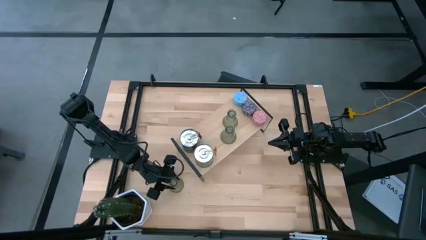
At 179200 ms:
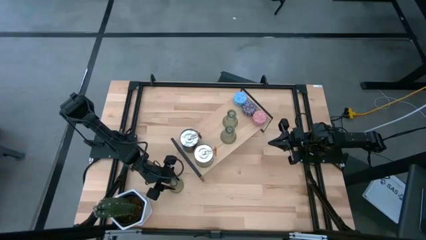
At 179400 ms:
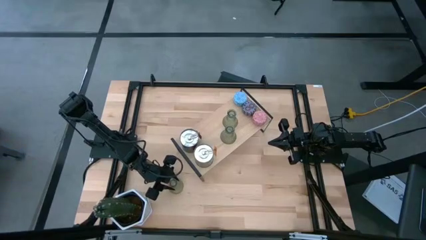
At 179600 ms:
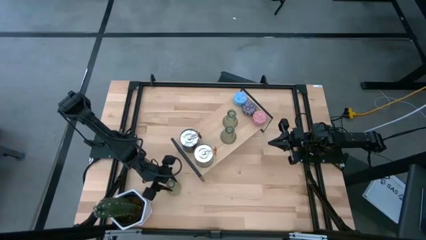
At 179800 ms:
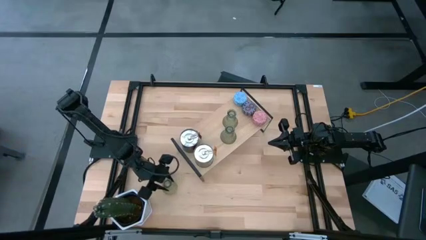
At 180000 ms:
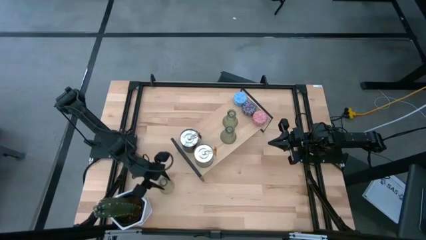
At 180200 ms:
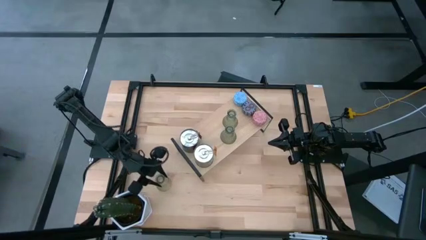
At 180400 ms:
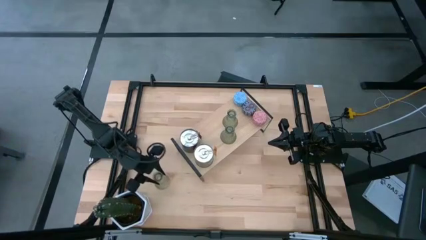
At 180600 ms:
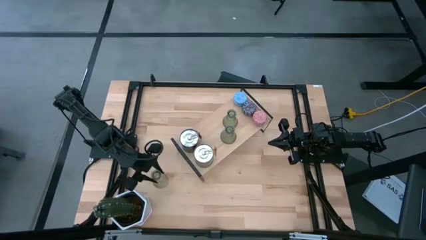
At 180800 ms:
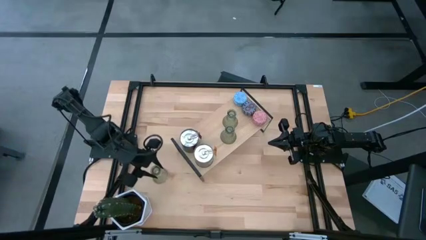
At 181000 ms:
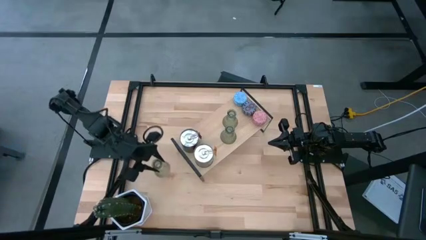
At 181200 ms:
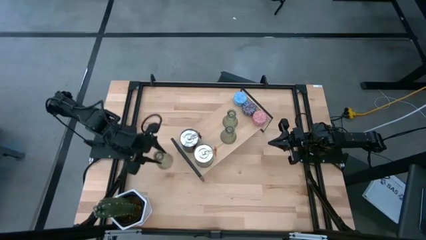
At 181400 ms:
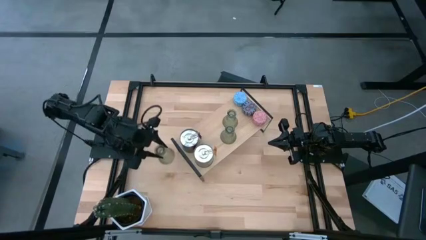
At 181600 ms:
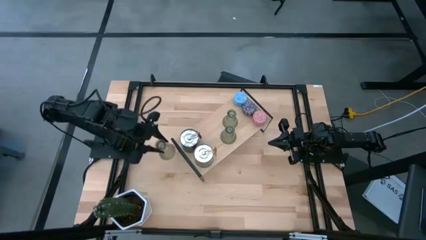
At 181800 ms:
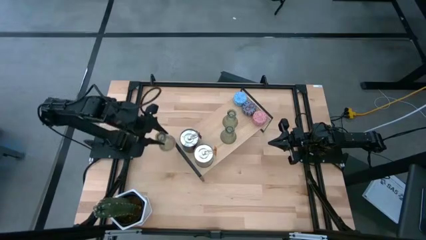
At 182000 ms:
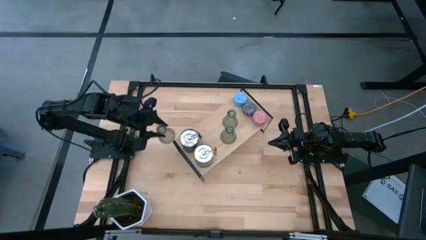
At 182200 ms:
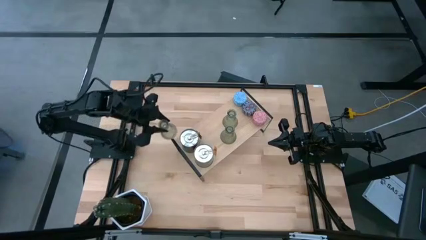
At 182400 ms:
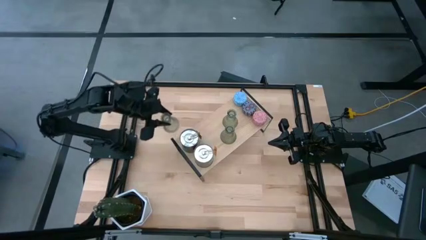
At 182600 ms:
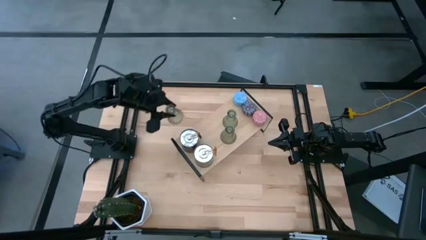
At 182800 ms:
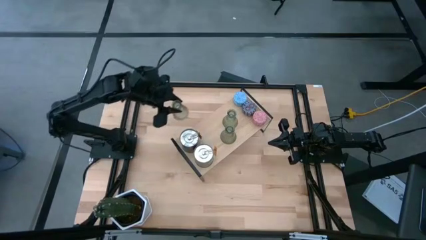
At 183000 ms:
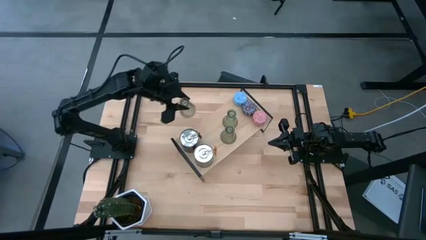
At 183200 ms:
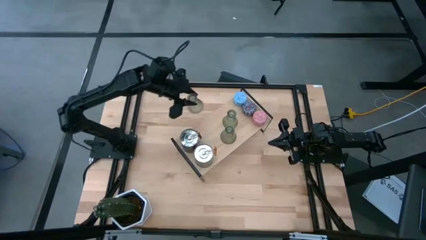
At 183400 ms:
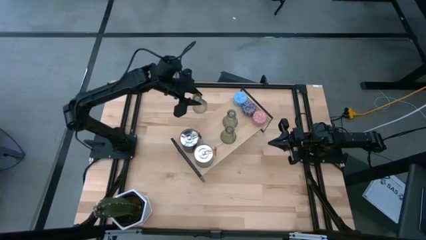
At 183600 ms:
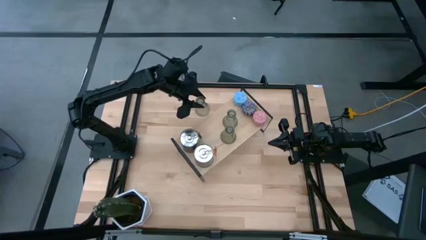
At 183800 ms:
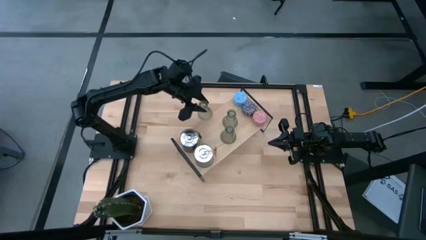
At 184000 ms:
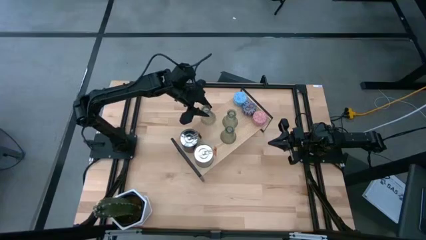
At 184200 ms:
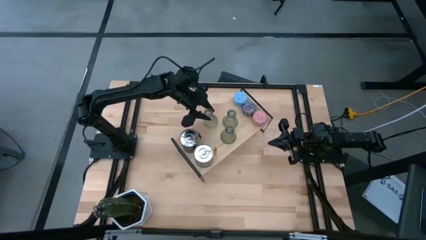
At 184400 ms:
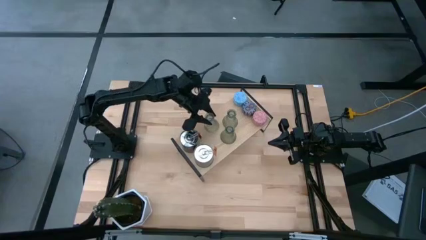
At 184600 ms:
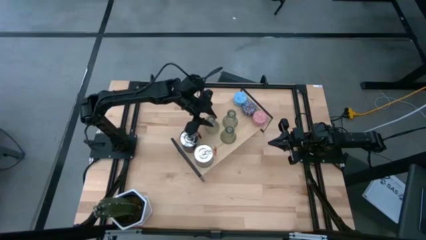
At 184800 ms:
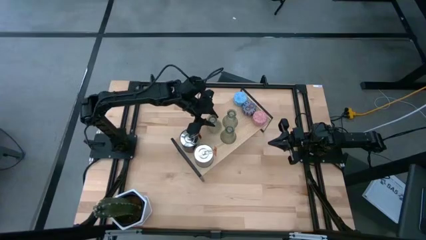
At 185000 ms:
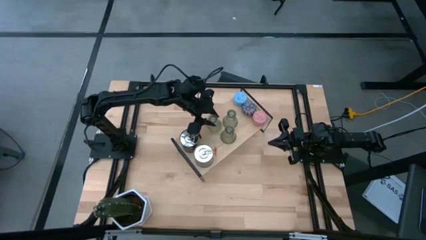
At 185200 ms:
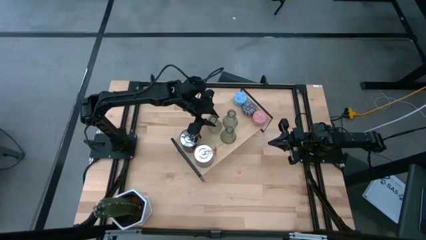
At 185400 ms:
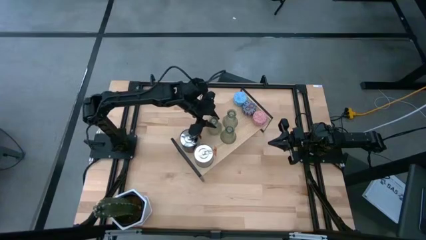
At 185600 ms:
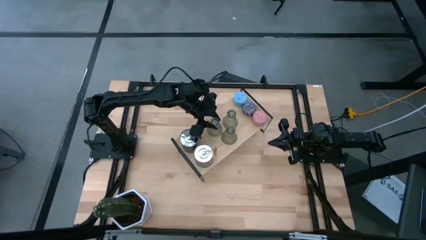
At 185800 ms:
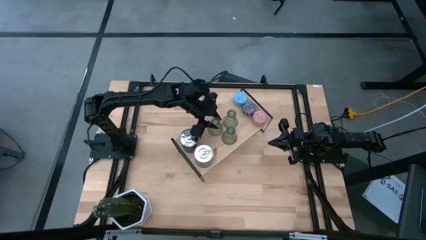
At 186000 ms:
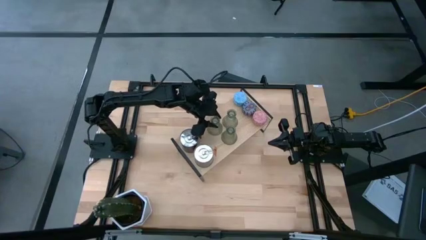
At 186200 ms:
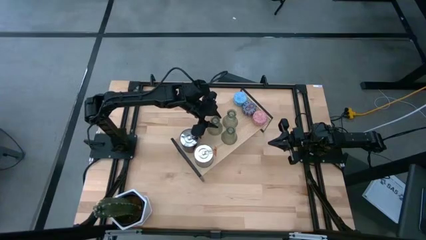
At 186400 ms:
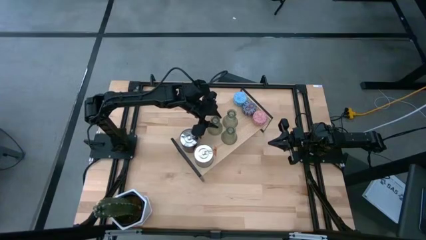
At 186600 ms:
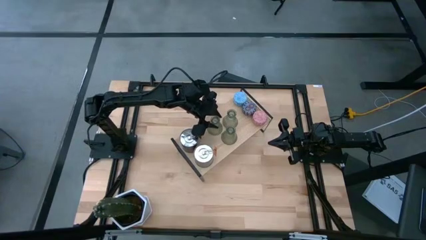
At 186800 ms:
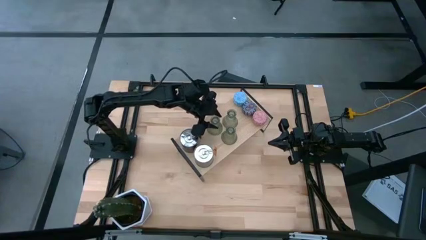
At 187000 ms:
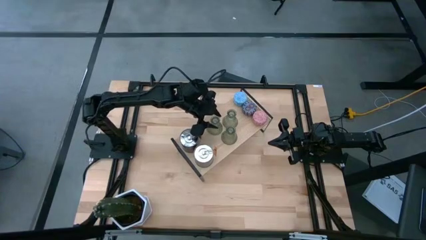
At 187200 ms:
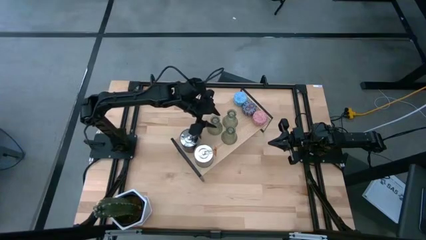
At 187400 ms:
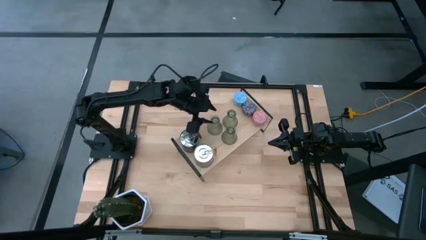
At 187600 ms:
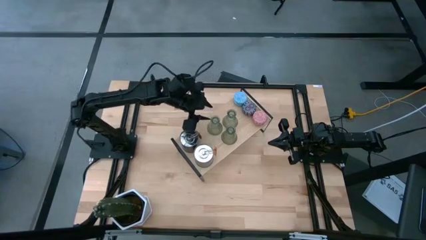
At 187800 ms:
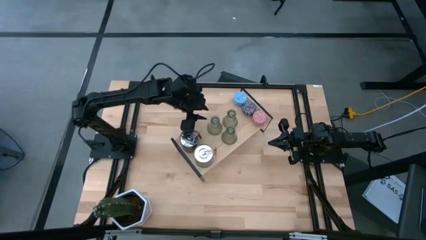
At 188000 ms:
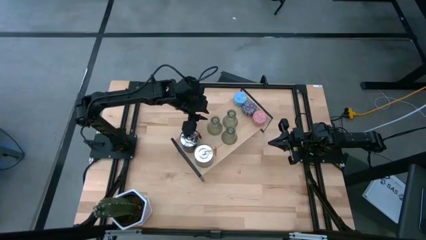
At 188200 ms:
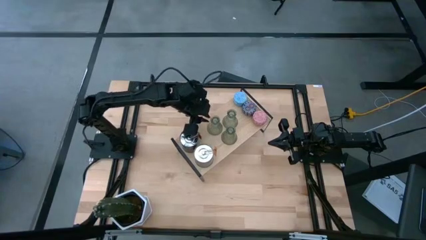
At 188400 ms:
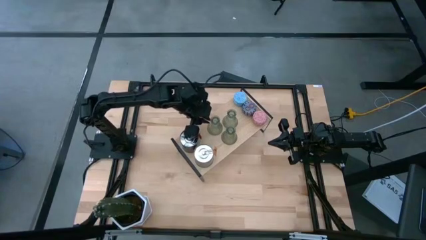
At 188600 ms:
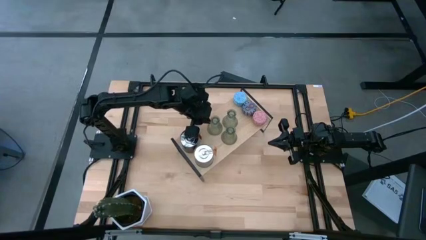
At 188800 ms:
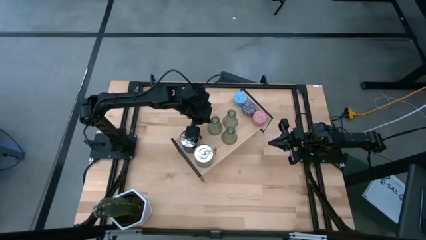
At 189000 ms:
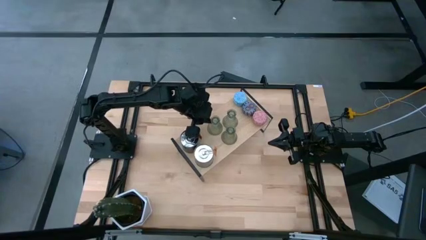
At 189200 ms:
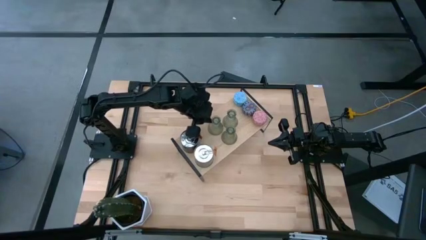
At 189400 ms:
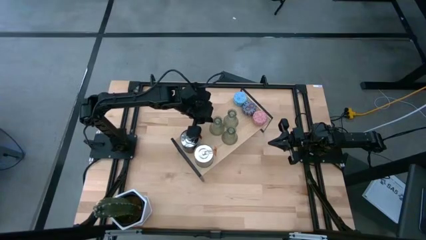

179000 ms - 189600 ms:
Task: Pick & Place candle stick holders
Put the transparent candle holder on the shelf

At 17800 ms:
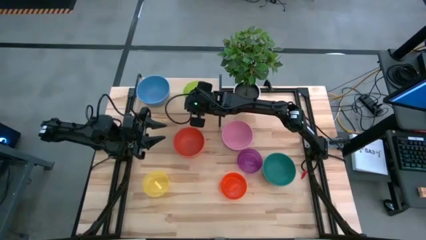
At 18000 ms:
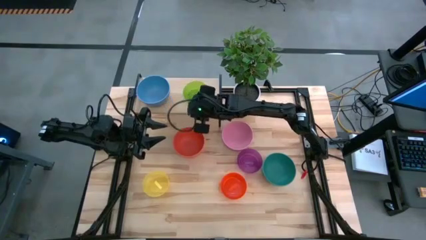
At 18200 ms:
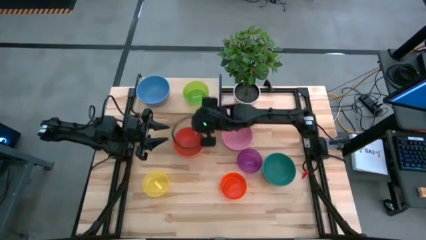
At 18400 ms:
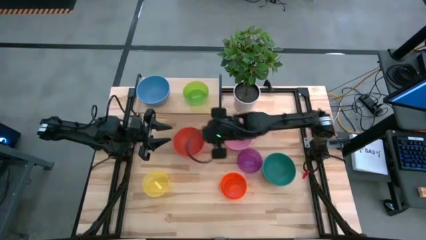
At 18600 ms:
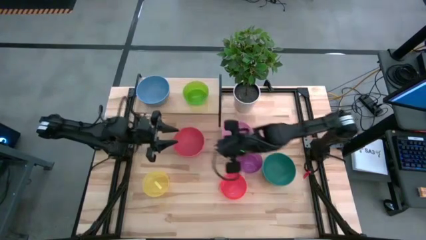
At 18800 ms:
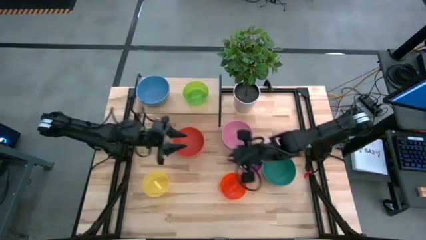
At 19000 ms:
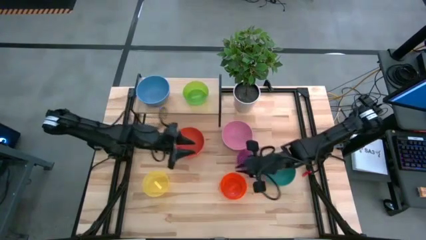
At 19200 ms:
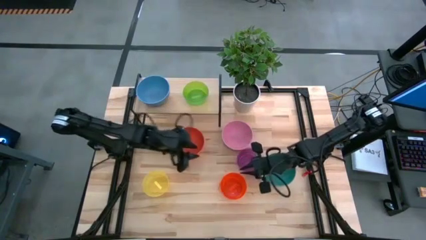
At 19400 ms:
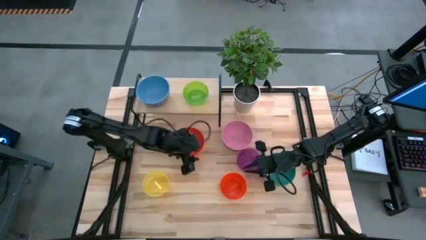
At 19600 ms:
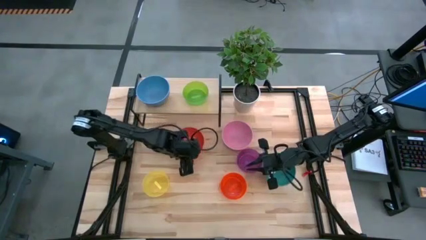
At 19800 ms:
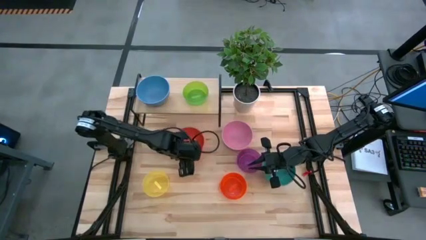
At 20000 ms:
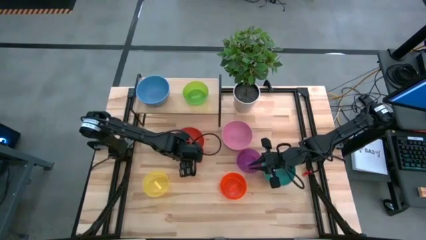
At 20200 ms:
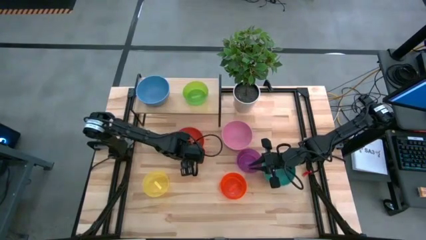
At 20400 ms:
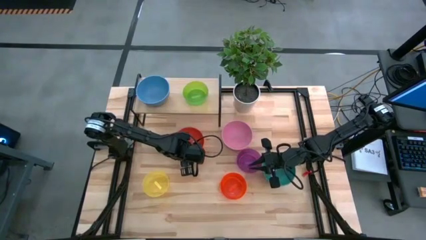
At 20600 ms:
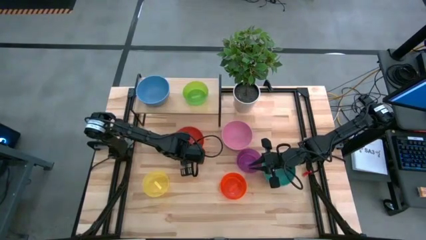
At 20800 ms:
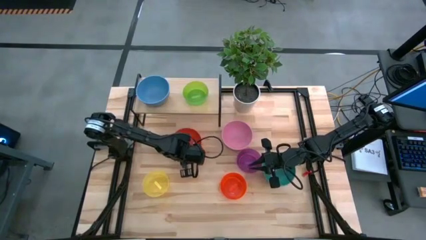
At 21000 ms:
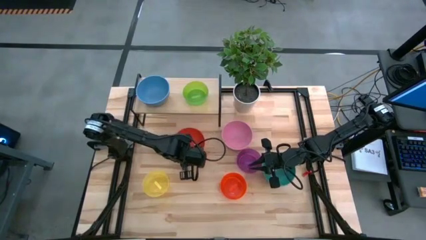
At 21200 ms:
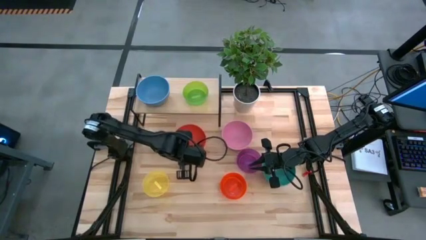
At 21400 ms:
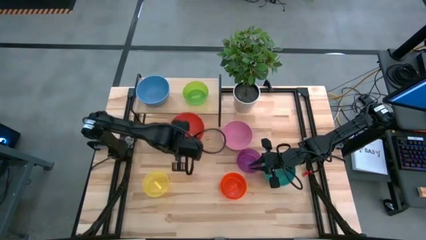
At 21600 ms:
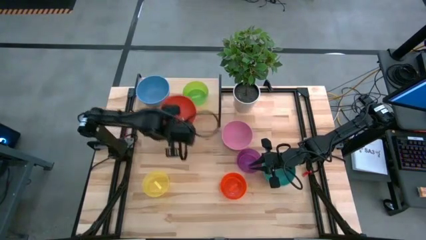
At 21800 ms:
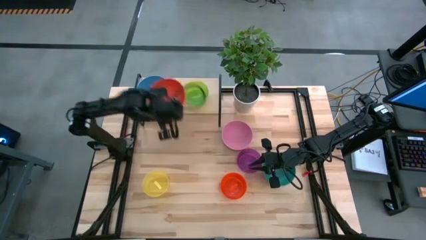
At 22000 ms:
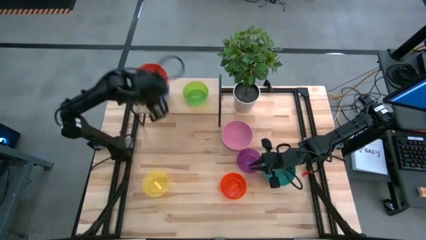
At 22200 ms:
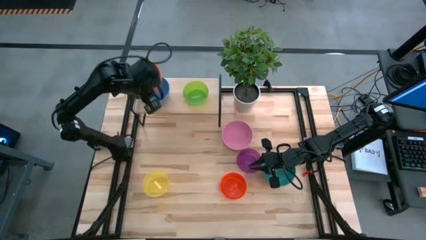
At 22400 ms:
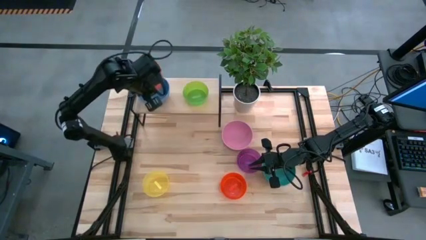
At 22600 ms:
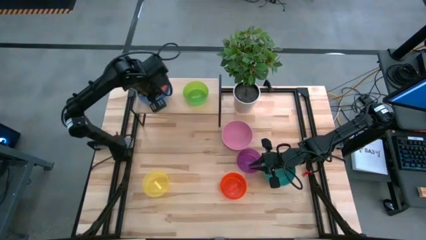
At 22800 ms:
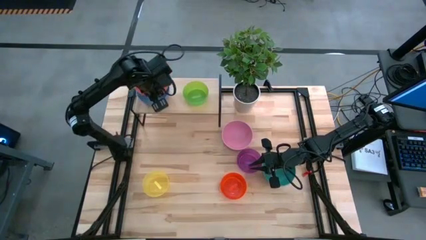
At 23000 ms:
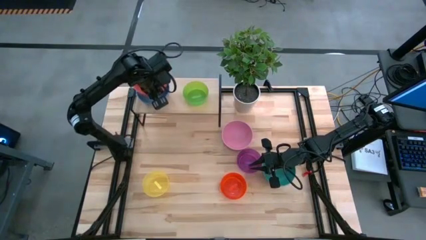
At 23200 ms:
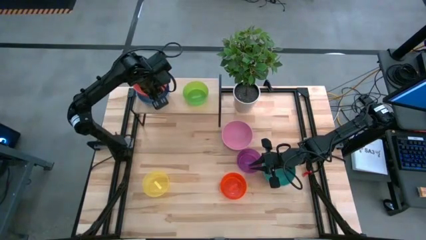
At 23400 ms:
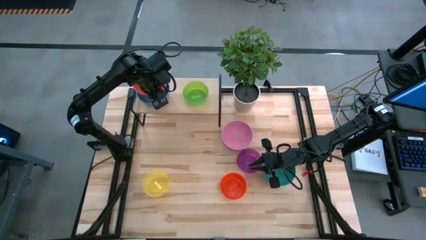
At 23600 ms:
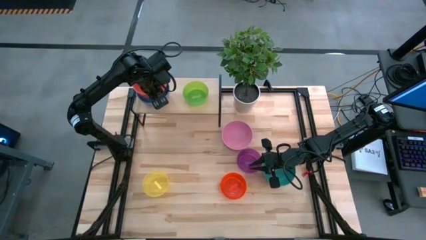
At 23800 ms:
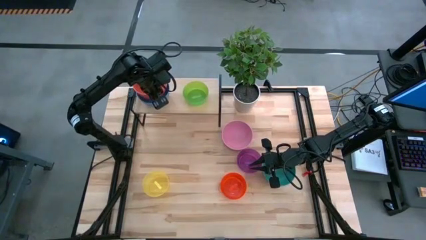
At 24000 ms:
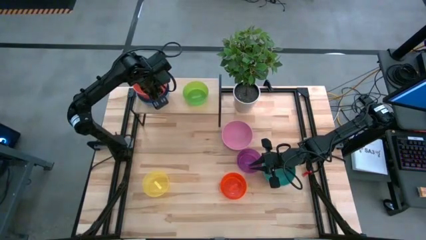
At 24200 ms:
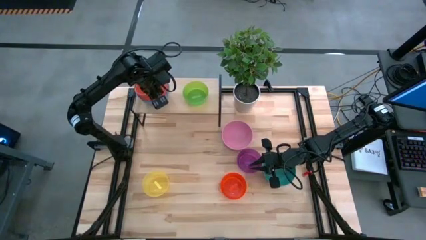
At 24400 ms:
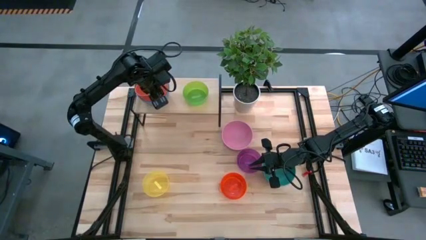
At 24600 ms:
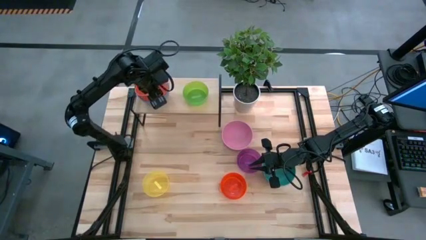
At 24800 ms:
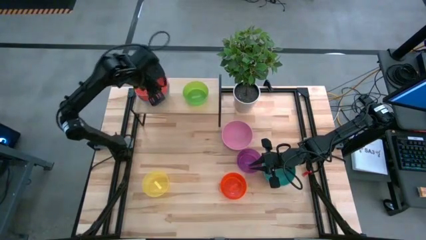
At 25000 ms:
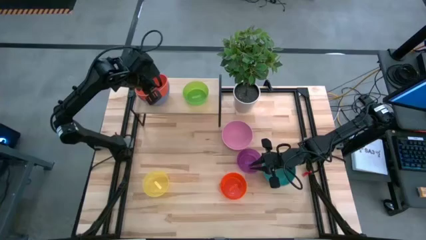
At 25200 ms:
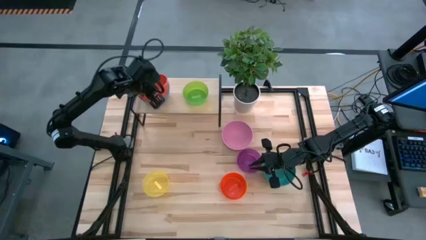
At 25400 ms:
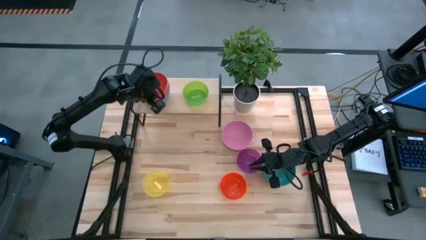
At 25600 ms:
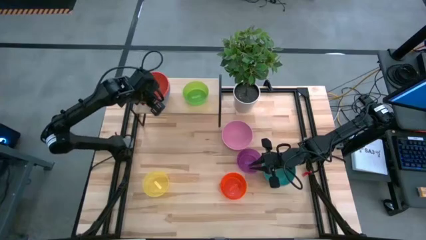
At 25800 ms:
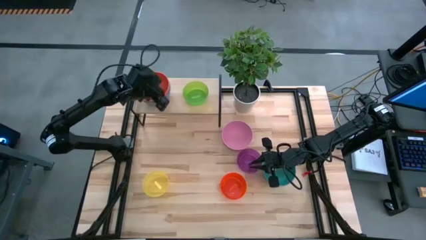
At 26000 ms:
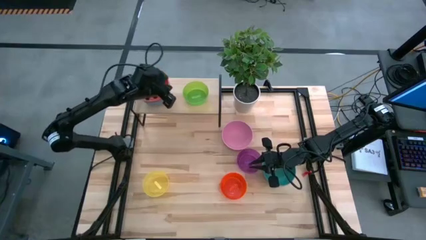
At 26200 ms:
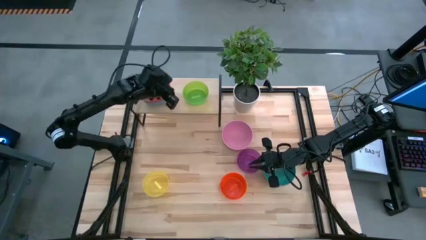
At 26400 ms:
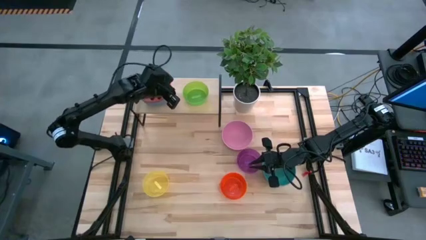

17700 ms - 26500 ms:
Task: Place and stack bowls onto a shelf
Stack the orange bowl on top of the blue bowl on the shelf
